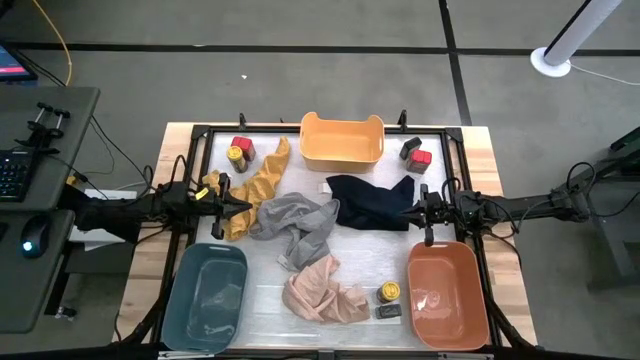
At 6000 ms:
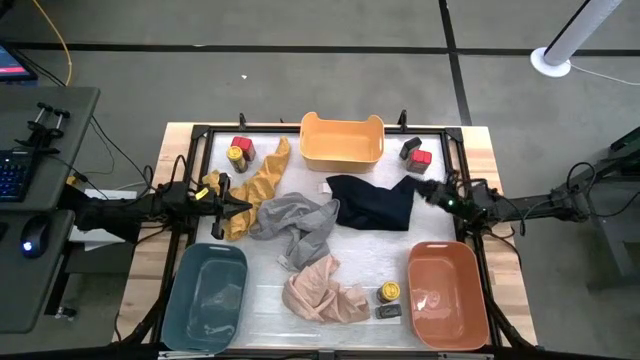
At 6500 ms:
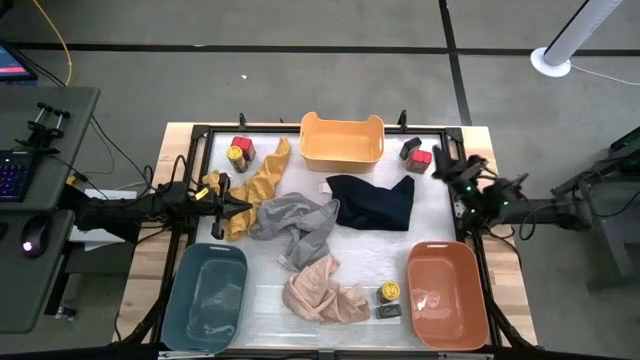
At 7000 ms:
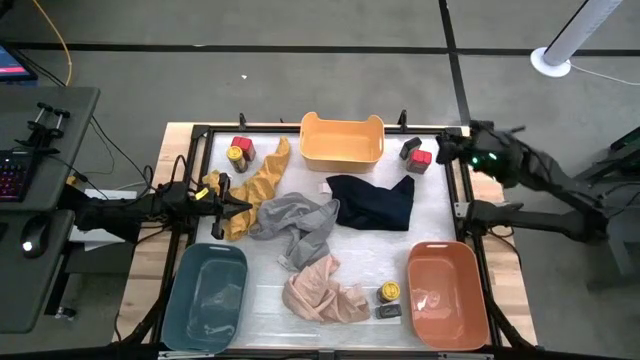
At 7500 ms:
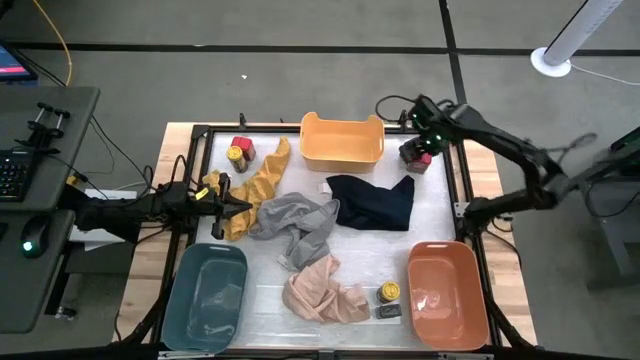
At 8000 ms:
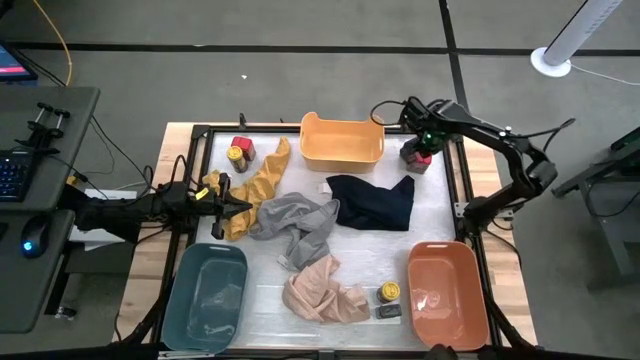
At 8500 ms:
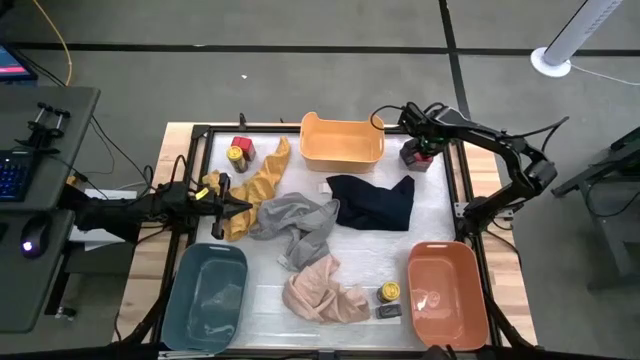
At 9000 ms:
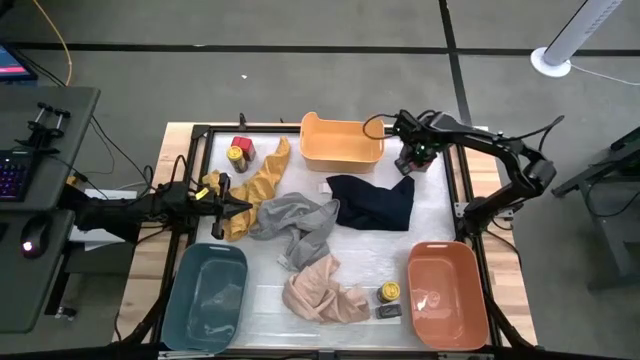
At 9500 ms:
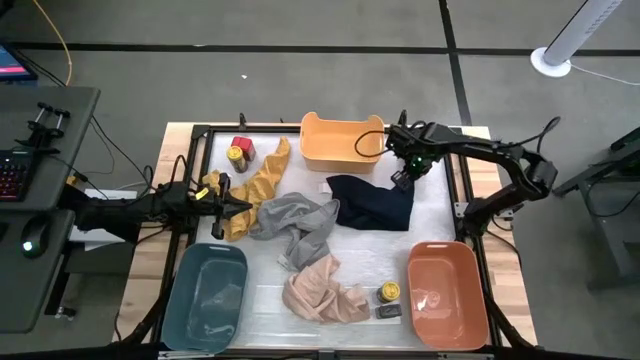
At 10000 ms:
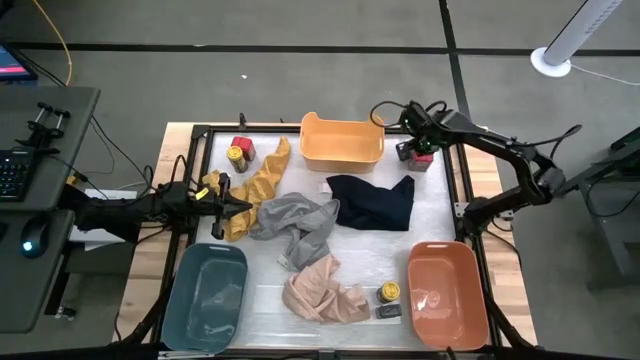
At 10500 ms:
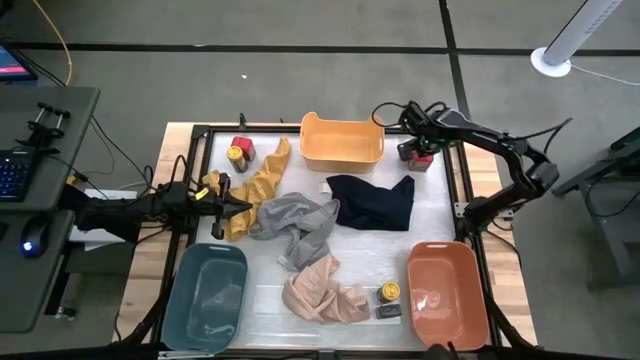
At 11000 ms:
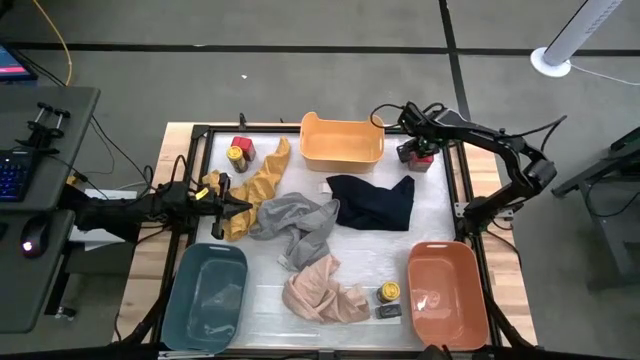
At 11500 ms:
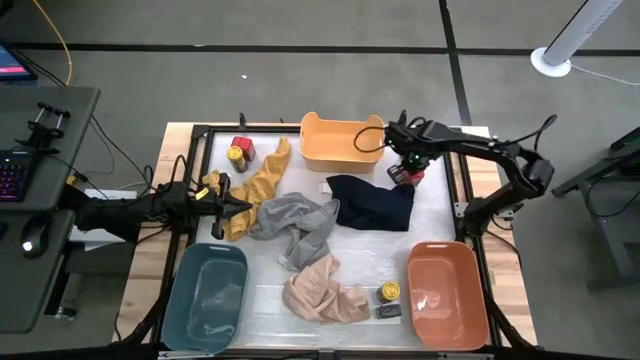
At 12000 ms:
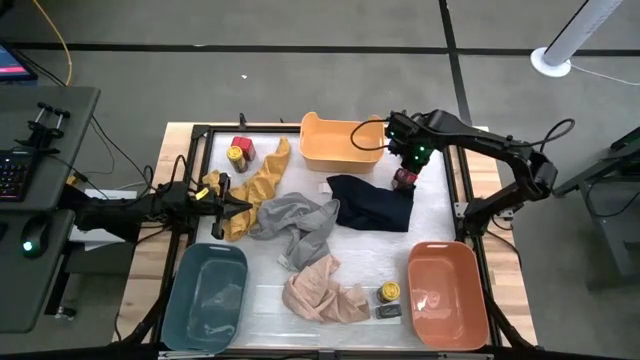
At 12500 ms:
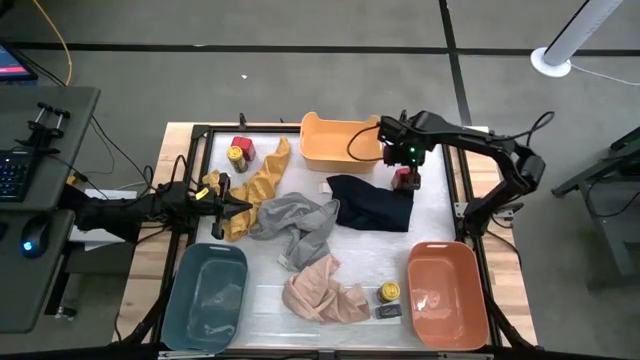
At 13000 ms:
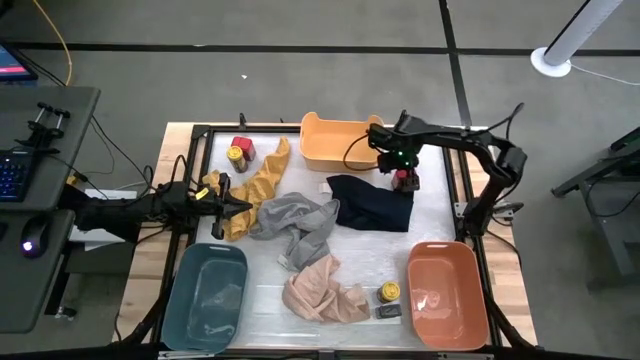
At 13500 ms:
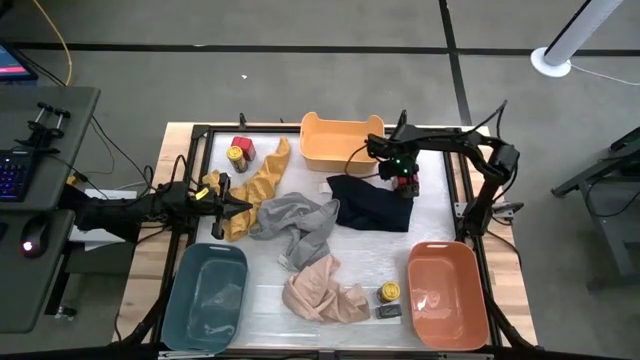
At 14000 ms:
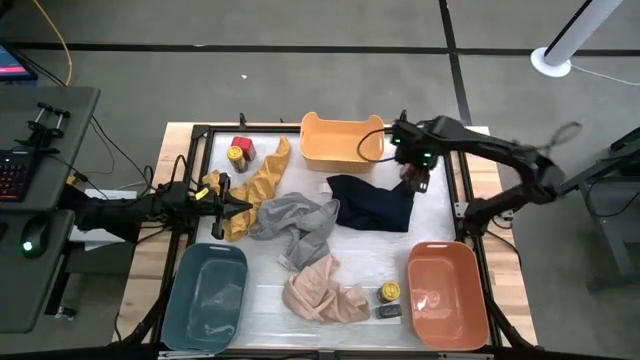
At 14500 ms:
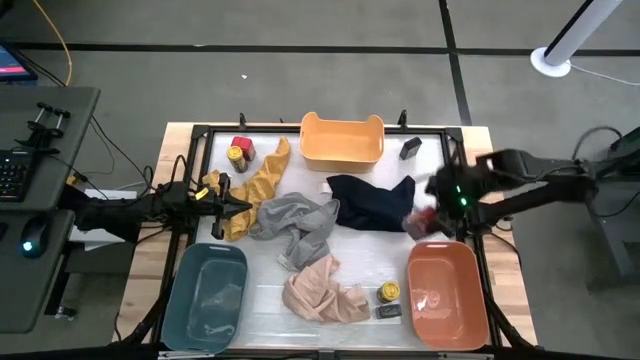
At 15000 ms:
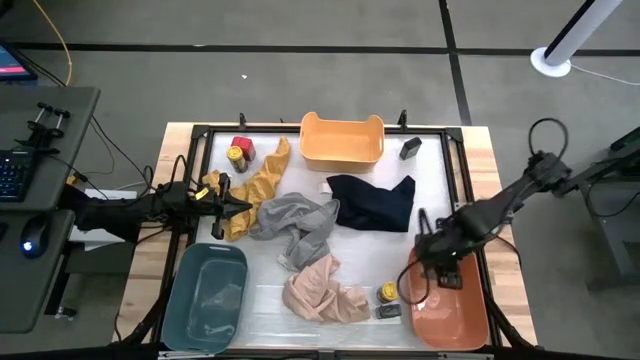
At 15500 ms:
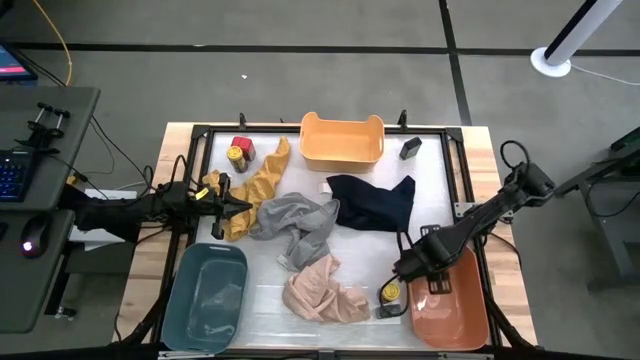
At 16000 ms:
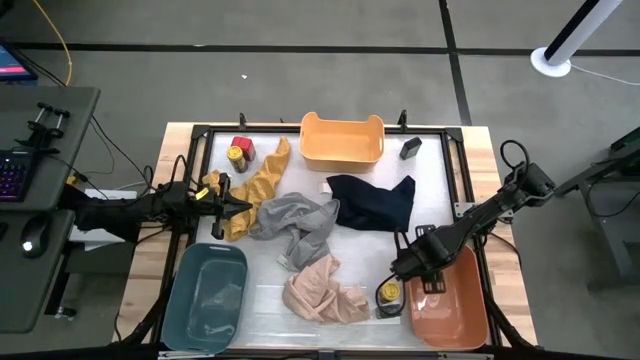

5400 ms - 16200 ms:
Task: Sort spices by type
Put the right red seasoning can into the orange bin

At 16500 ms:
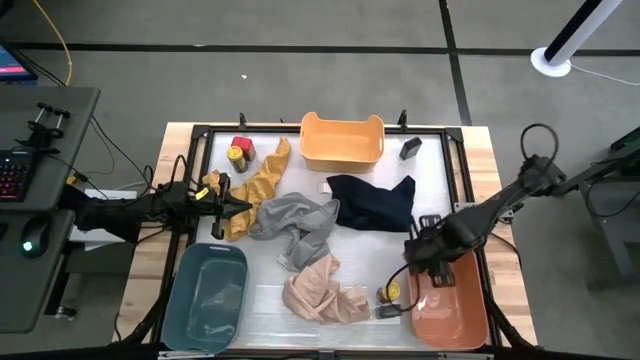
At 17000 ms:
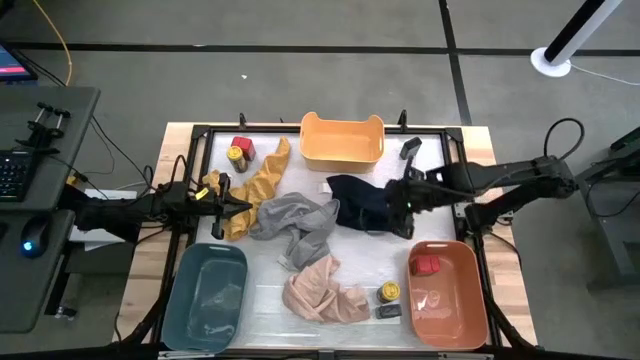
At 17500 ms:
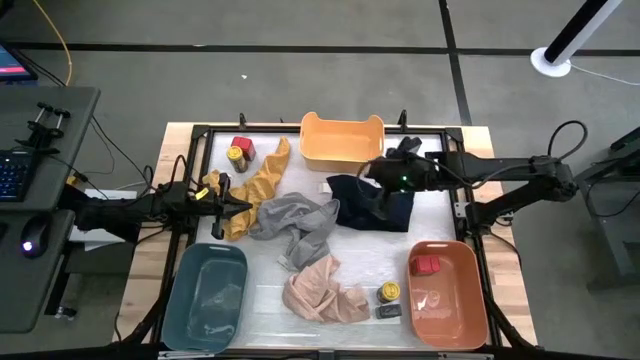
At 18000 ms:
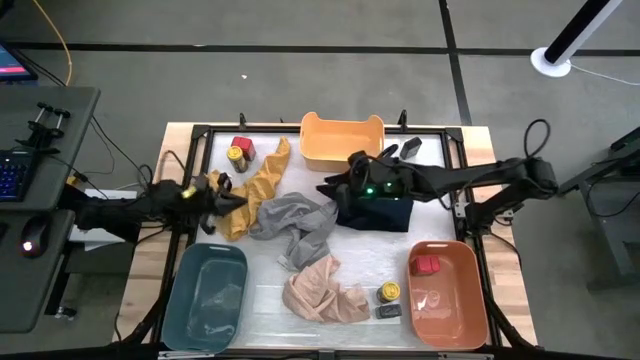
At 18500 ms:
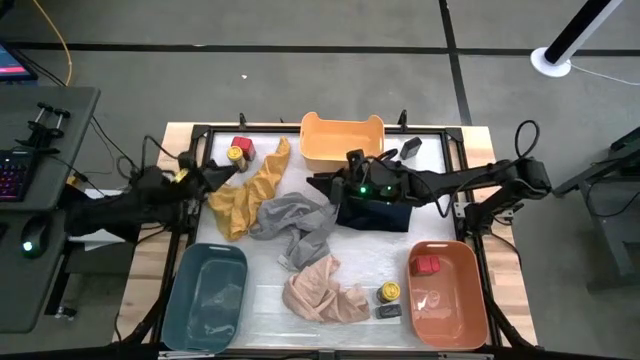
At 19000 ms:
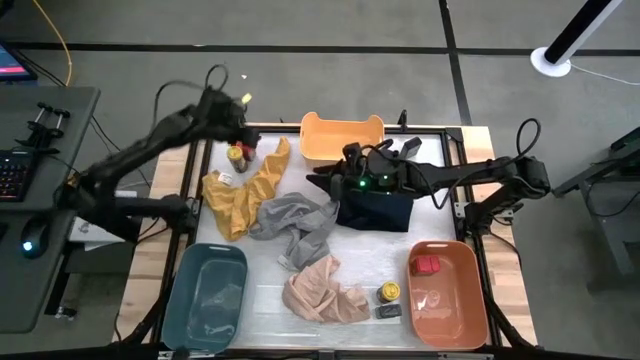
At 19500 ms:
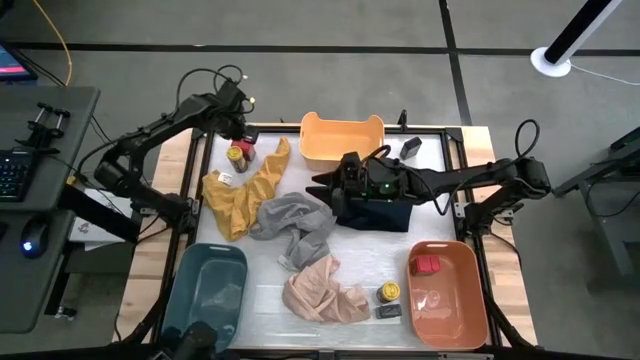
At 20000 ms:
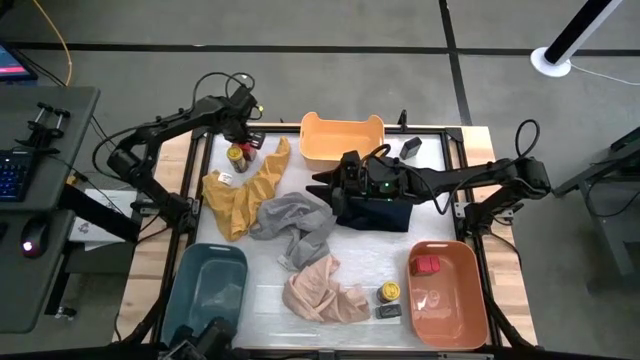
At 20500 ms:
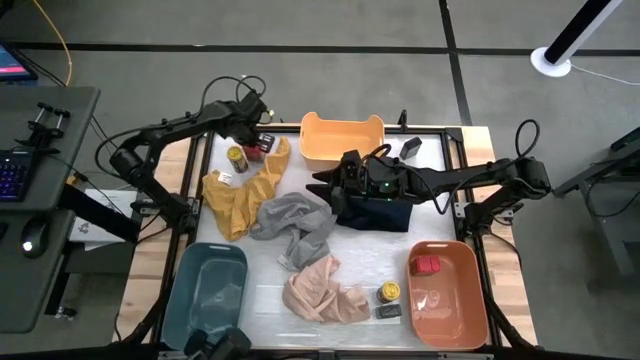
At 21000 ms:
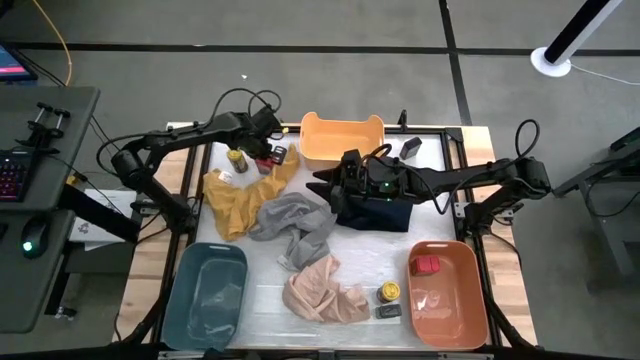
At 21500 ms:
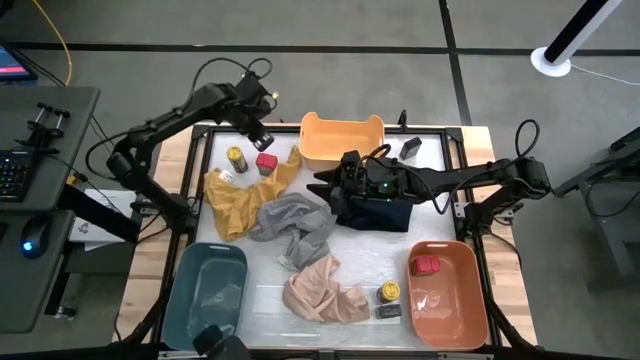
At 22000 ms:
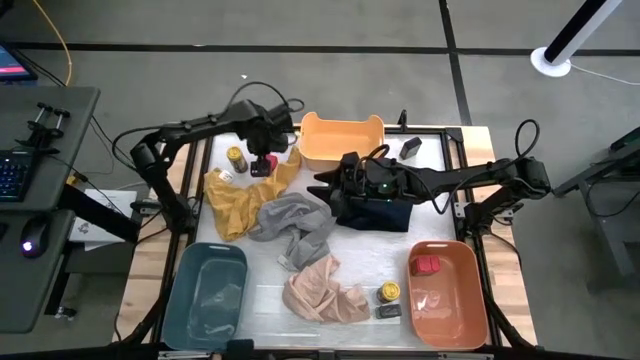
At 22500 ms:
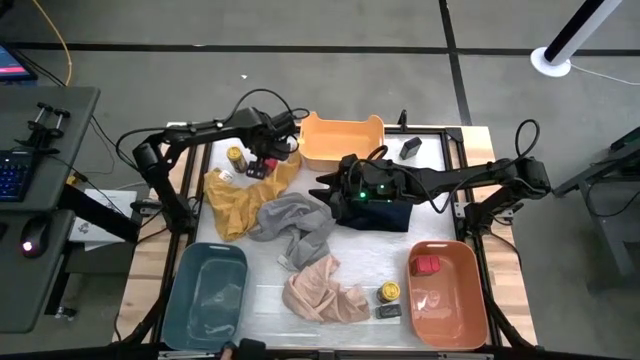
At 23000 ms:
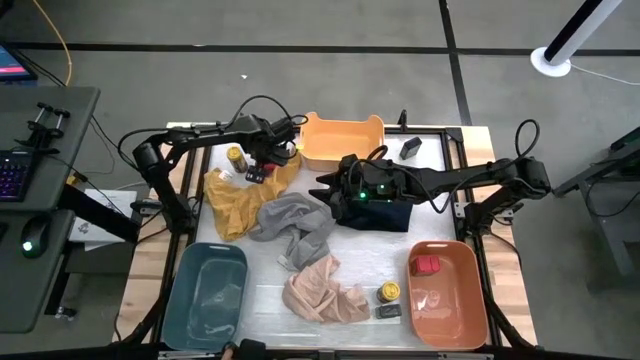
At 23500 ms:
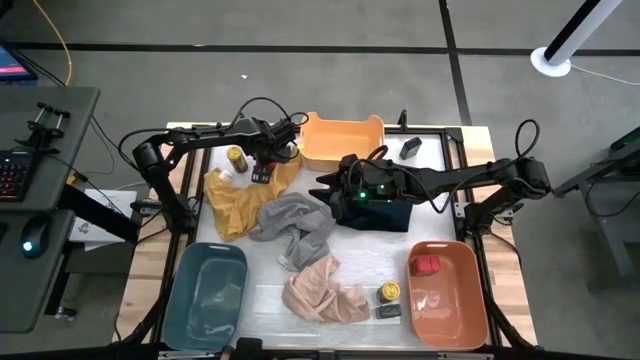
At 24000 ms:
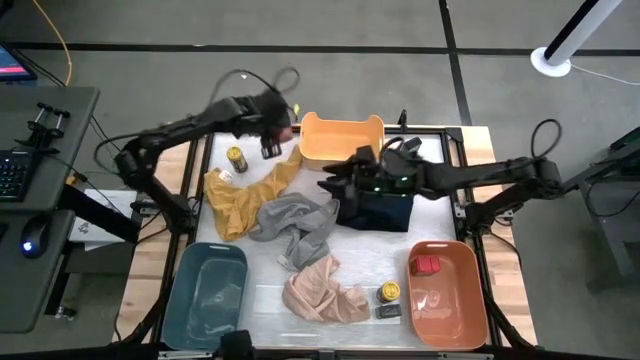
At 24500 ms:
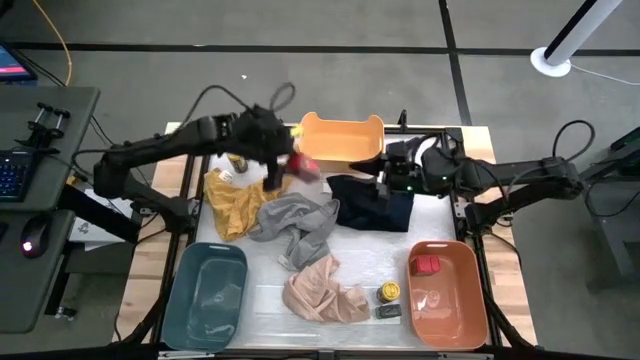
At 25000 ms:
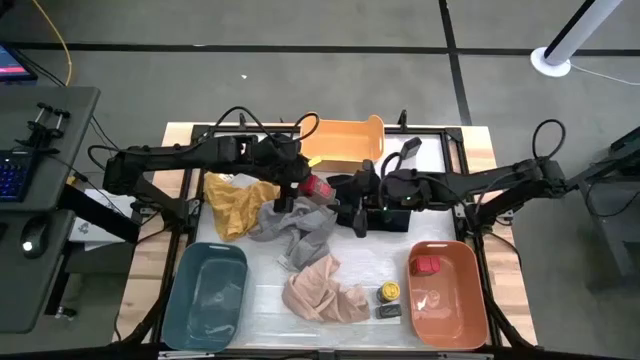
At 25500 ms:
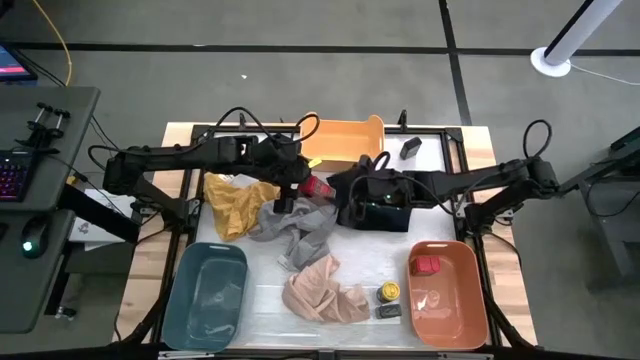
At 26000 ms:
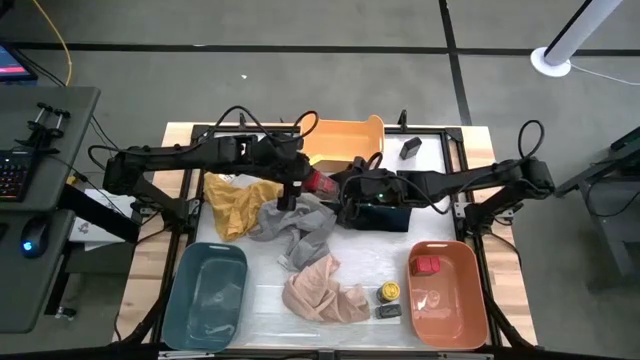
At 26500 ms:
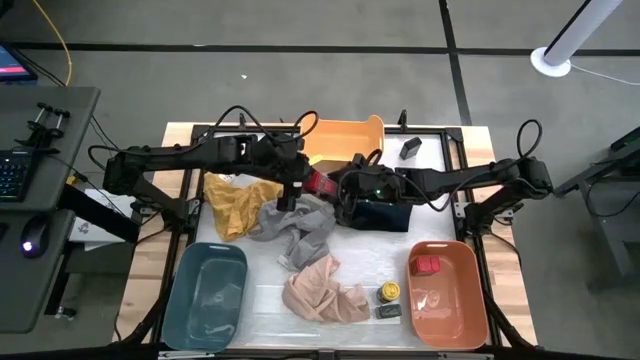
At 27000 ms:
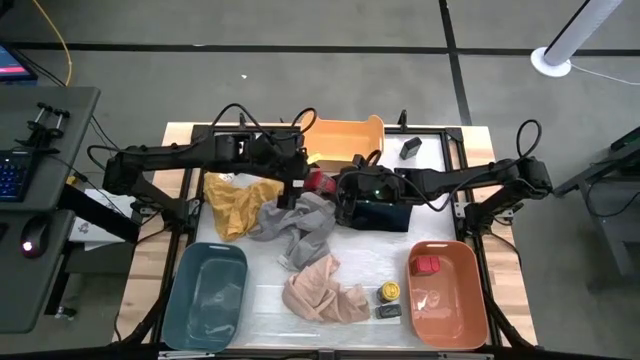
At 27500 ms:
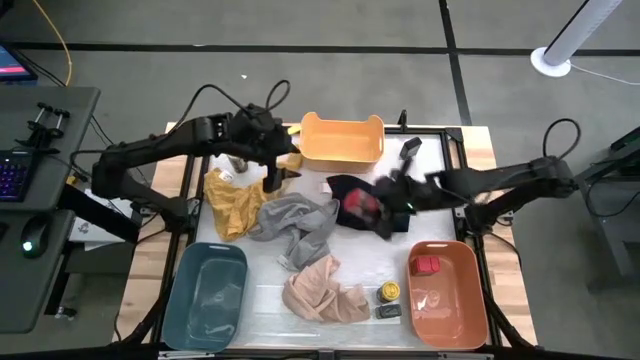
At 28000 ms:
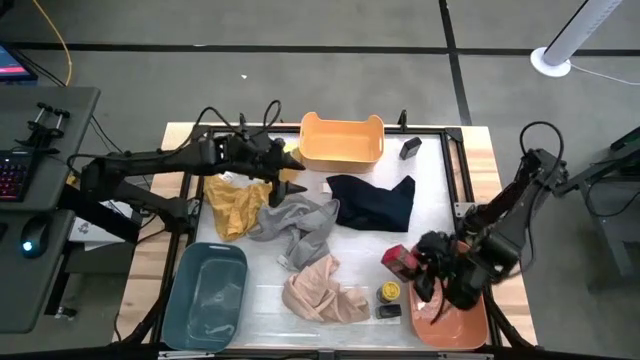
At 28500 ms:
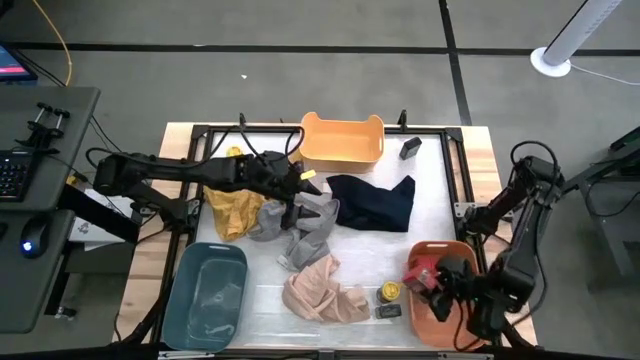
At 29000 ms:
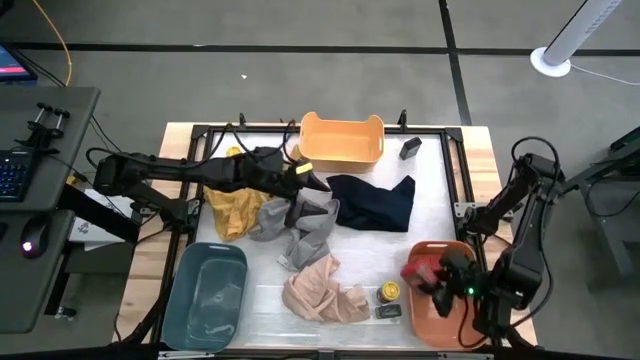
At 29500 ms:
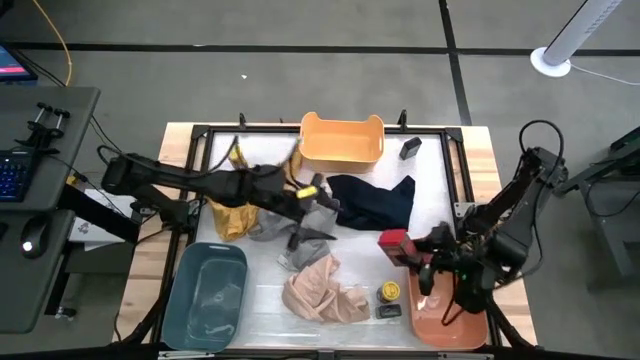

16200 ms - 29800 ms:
Put the red seasoning can into the orange bin
